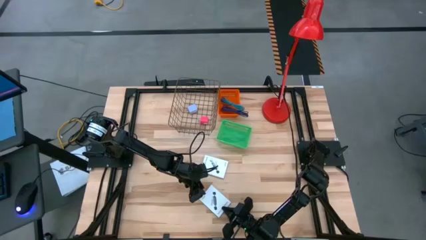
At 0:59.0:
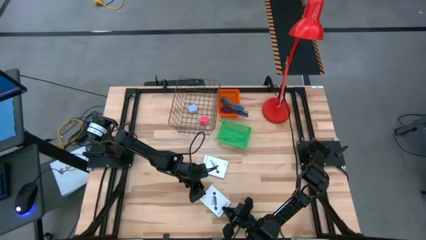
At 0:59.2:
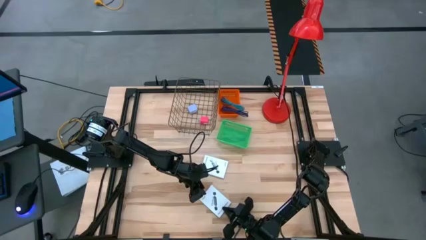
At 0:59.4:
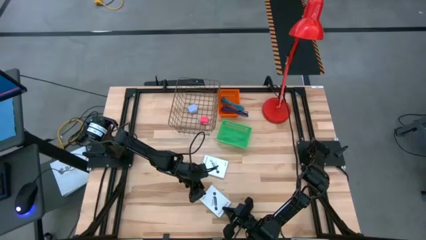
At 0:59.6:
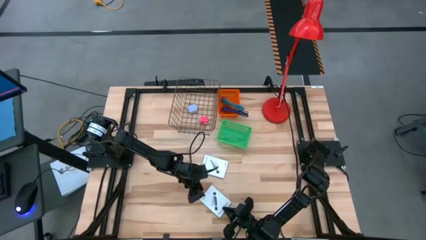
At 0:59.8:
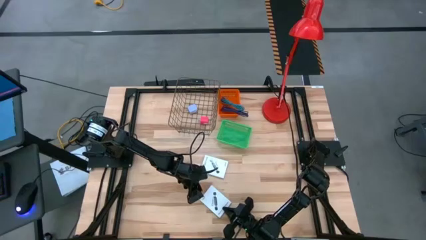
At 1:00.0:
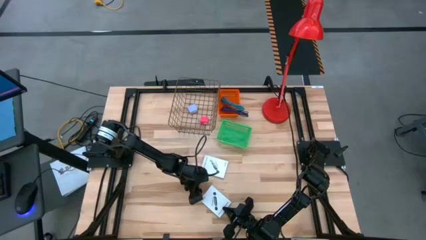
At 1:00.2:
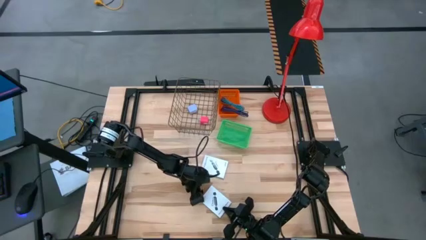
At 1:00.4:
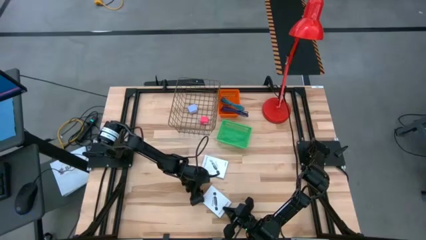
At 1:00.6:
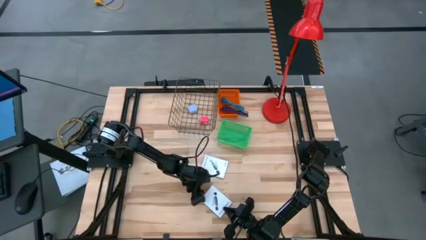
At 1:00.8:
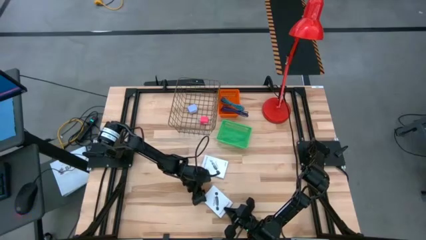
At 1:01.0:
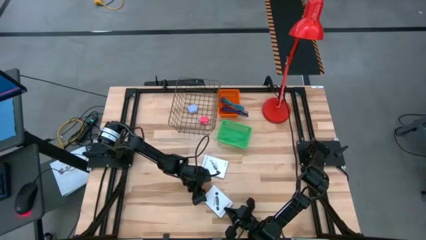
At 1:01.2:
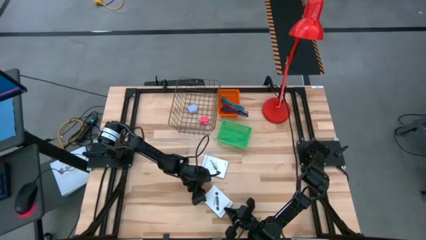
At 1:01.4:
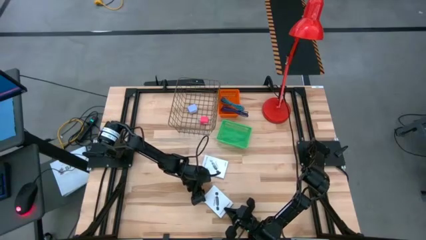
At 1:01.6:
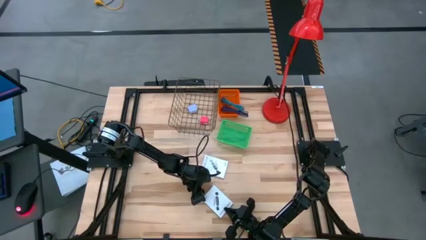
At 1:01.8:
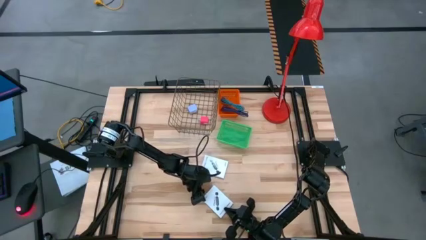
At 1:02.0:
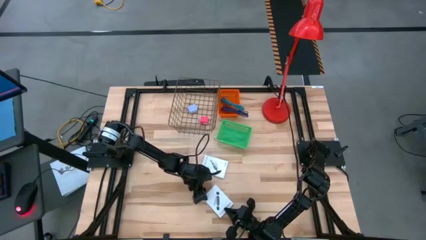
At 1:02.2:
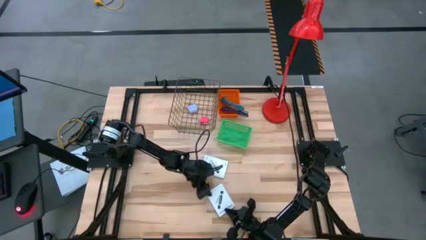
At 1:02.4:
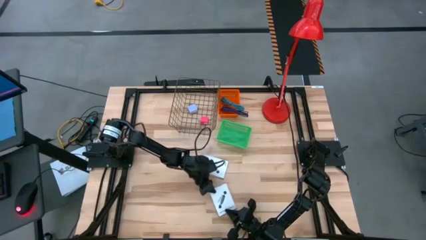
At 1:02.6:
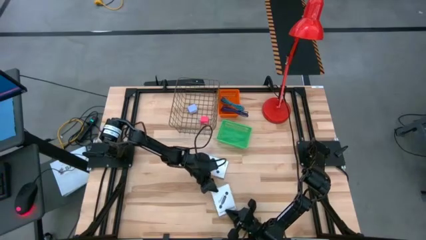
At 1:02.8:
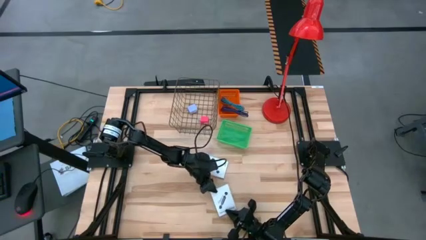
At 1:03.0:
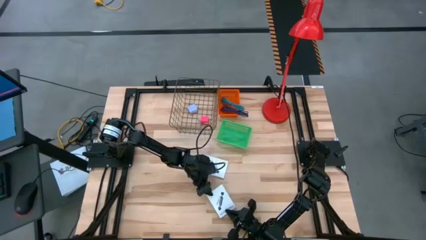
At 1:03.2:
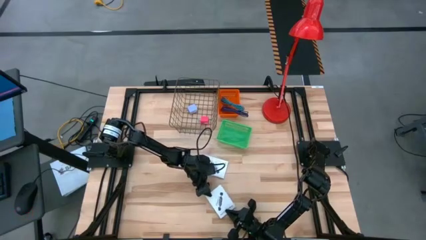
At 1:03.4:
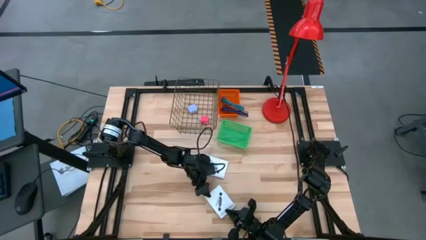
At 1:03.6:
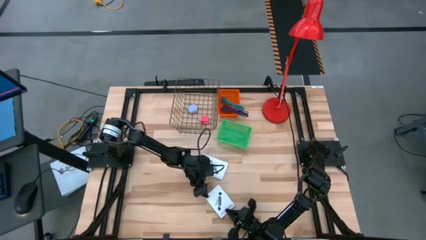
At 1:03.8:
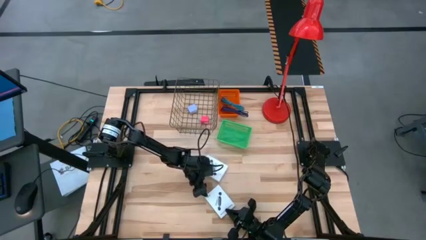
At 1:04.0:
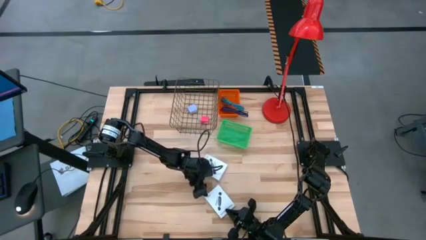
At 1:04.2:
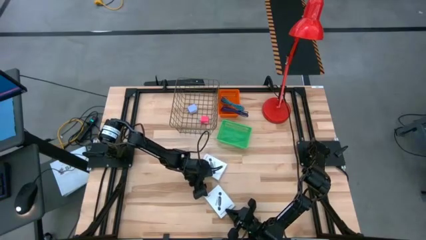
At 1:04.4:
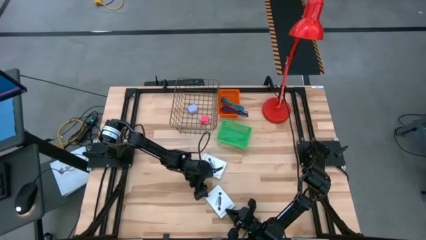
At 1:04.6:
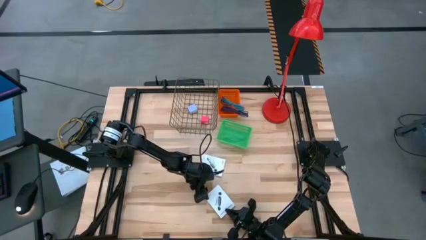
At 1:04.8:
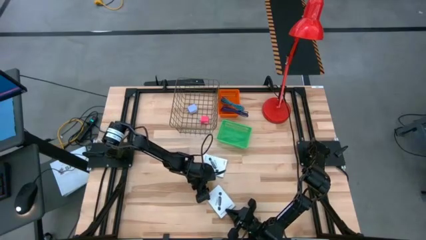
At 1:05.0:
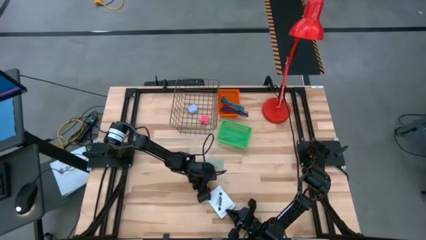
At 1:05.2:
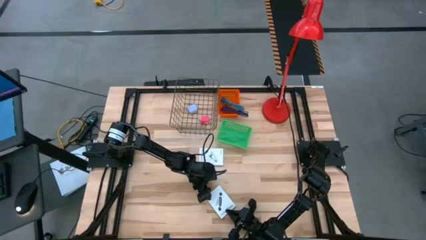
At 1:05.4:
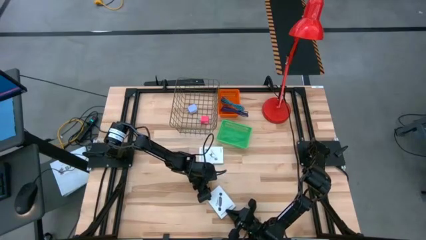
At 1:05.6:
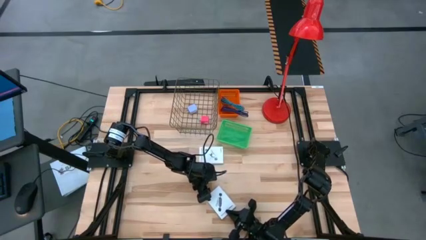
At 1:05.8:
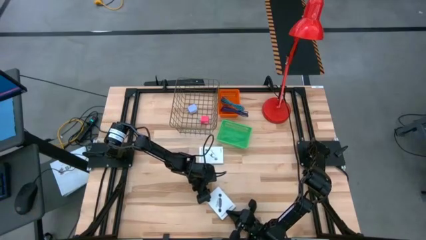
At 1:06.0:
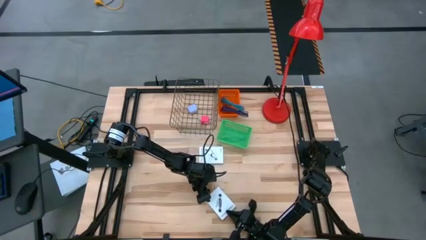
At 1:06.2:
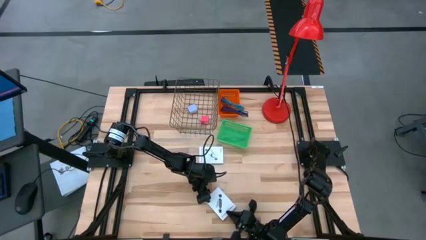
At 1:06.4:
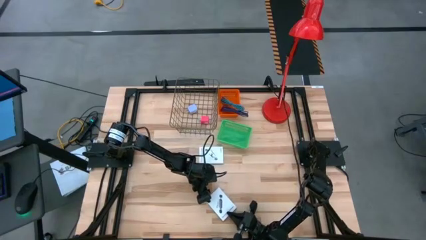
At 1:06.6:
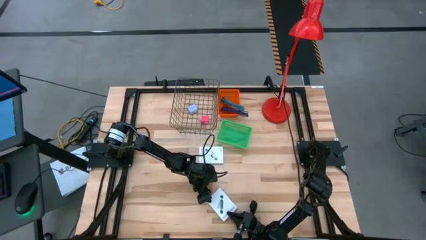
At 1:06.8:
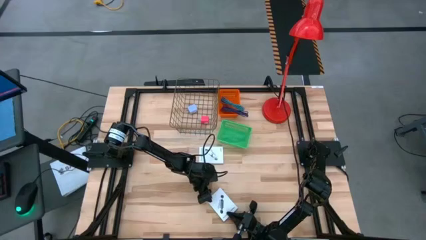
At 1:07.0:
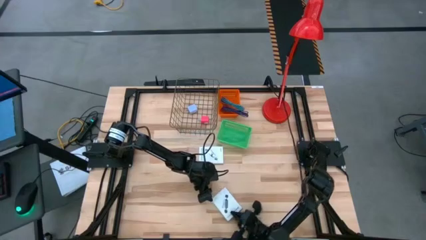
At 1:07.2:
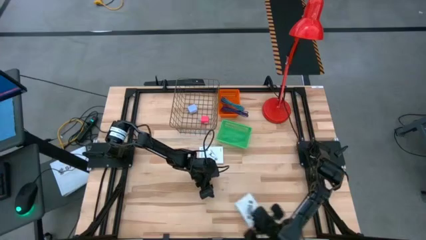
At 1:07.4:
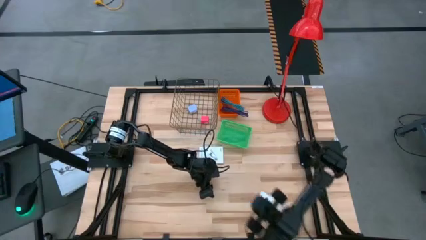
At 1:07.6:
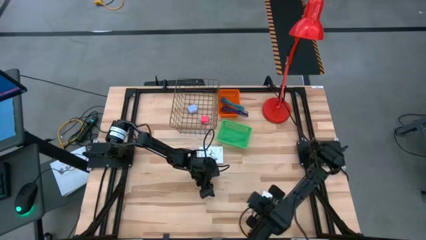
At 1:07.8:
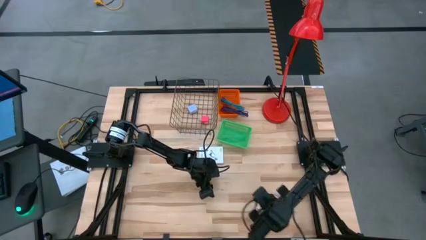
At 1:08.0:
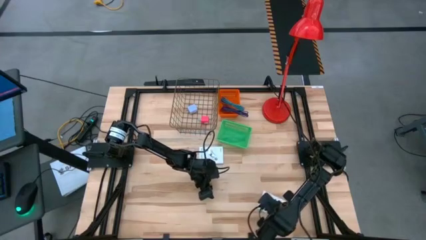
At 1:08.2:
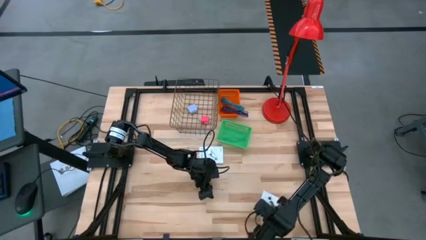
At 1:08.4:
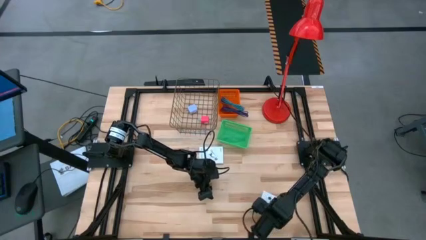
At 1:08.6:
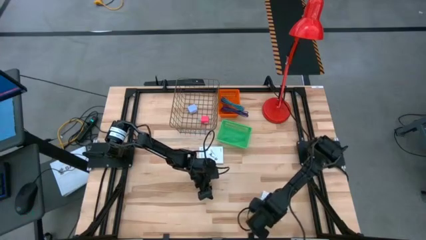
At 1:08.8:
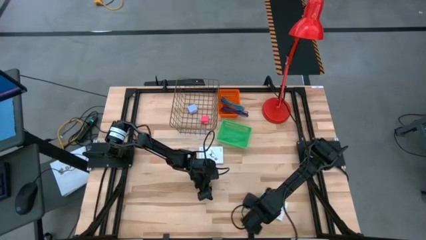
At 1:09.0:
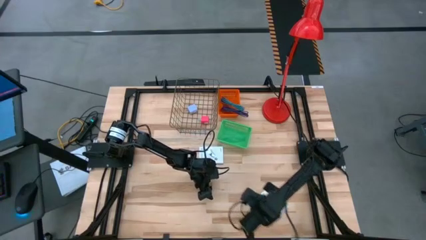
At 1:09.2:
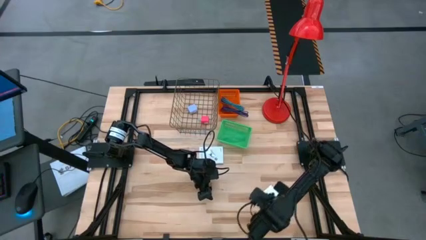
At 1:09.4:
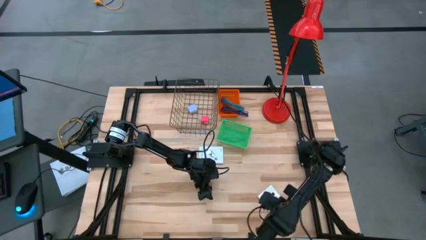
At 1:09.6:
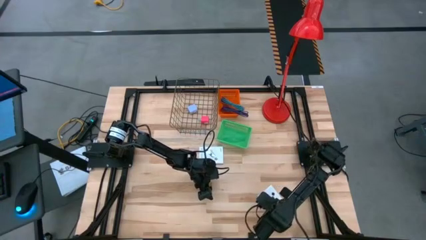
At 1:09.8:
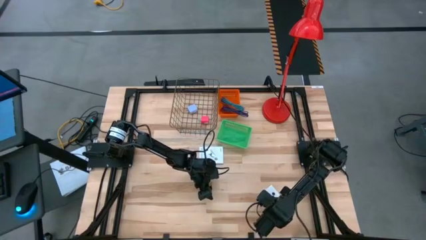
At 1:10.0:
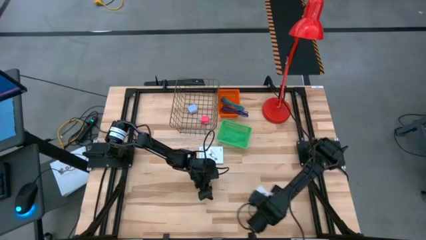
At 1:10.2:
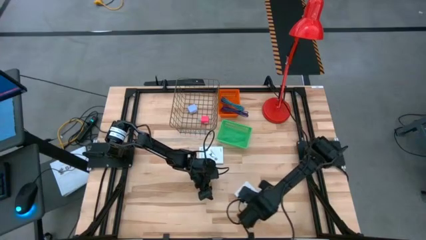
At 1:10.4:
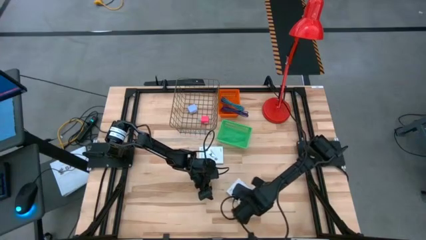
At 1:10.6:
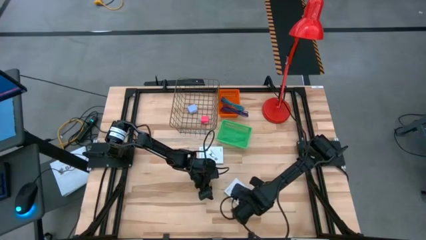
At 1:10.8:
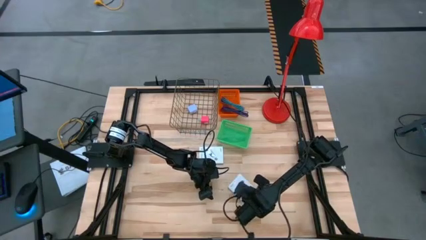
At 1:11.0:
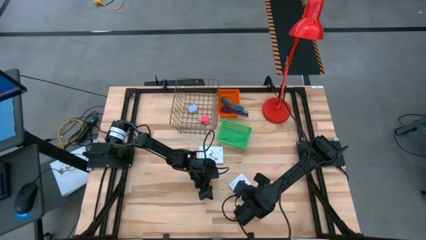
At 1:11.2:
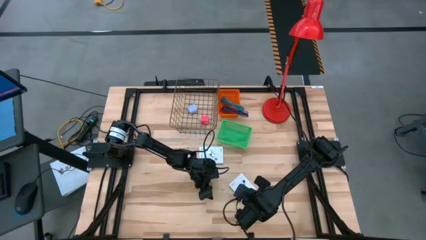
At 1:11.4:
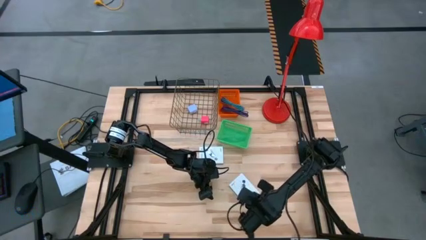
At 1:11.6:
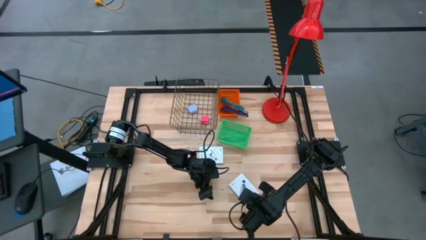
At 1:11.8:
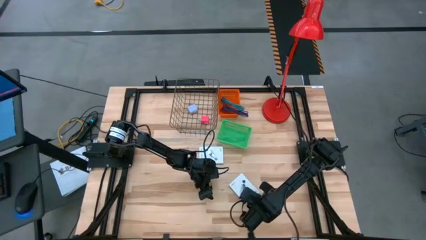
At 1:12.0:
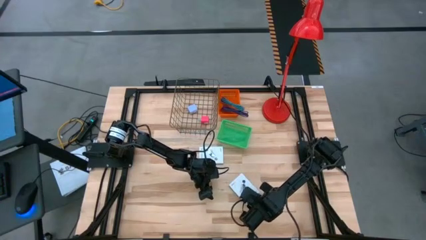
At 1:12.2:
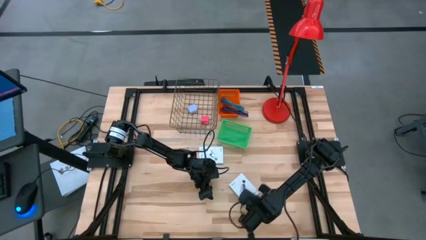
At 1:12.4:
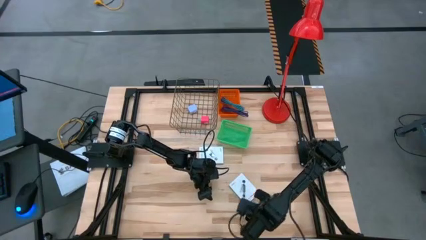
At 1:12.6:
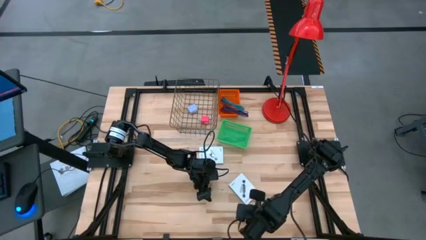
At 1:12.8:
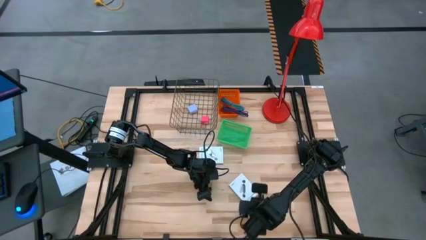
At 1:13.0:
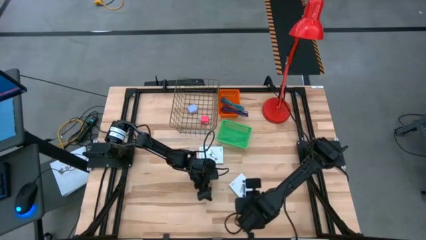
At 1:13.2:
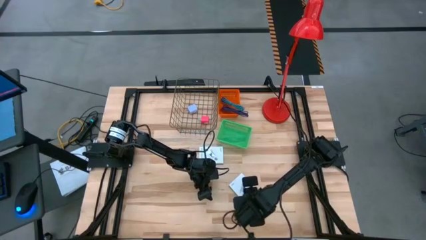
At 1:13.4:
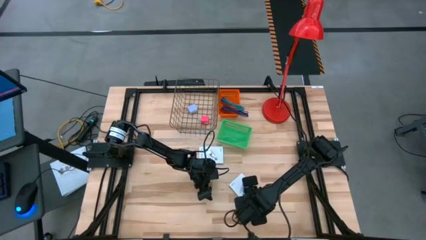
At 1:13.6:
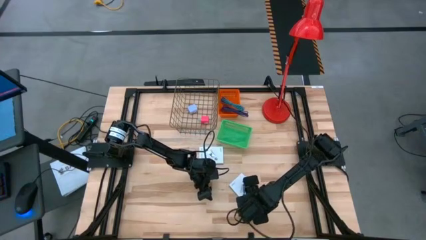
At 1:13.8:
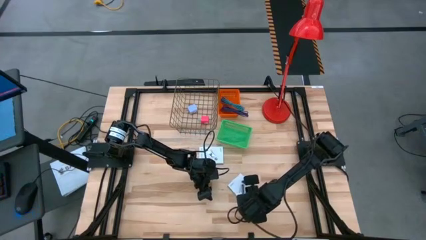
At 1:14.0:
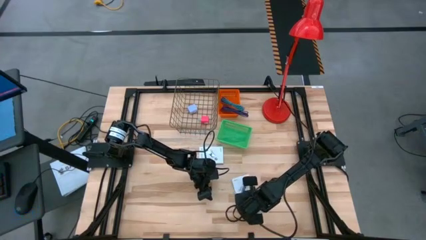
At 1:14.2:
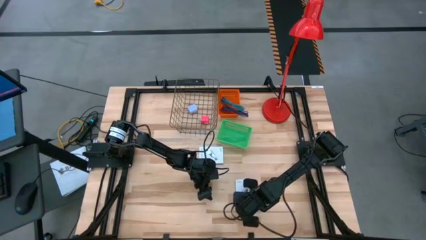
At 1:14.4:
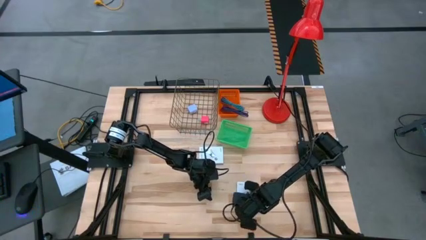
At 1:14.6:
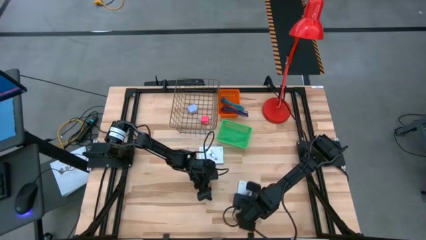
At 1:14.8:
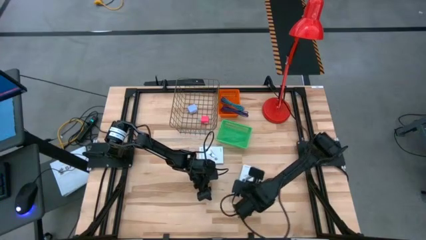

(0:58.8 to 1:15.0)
Task: Pick and place items into bin
Put the top card reader box into the green basket
